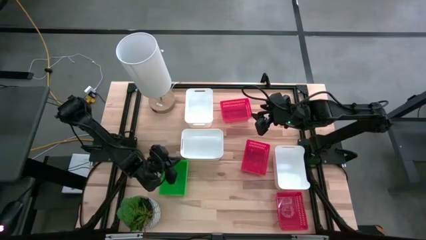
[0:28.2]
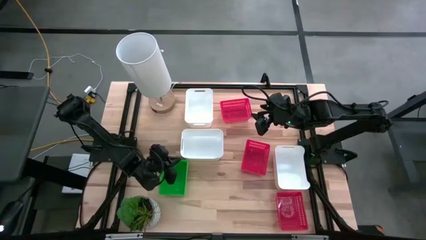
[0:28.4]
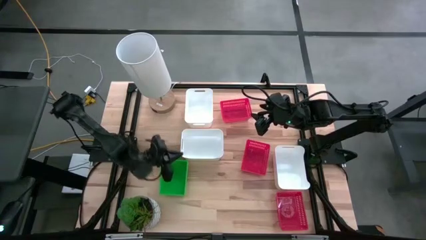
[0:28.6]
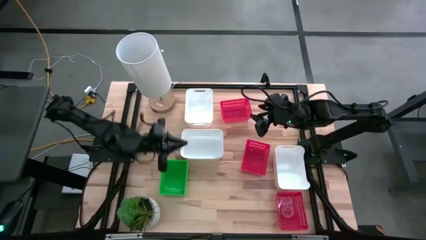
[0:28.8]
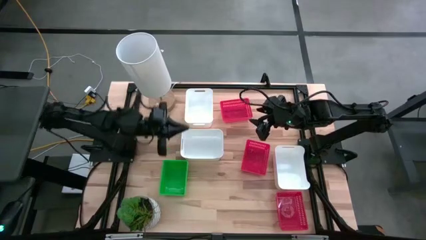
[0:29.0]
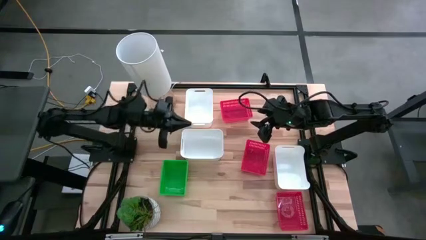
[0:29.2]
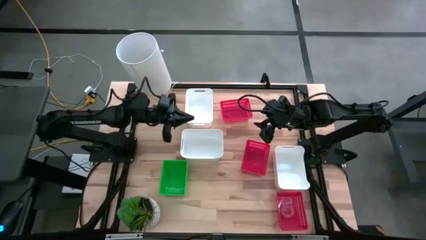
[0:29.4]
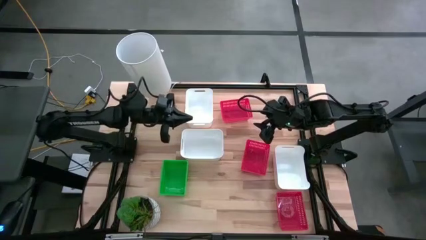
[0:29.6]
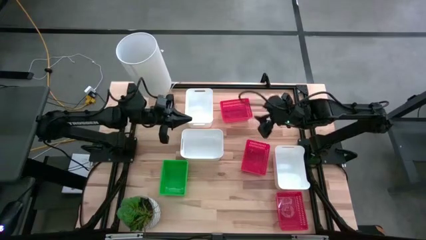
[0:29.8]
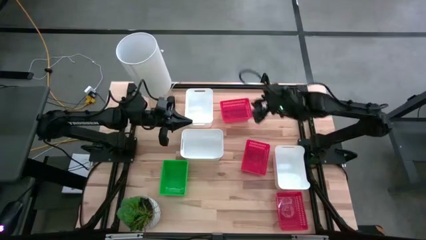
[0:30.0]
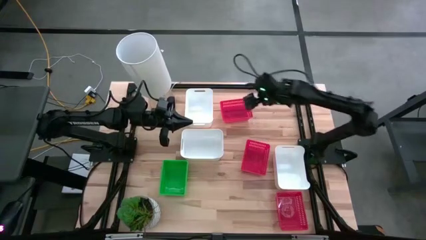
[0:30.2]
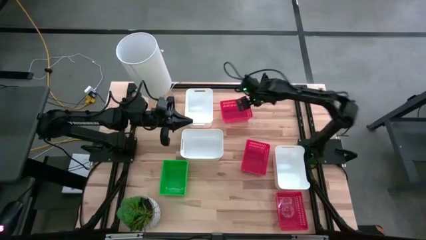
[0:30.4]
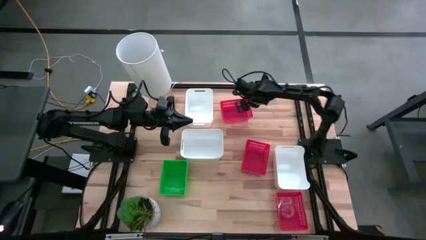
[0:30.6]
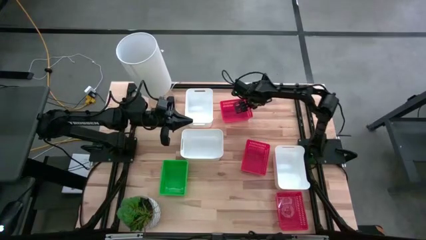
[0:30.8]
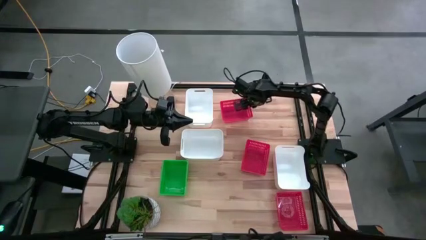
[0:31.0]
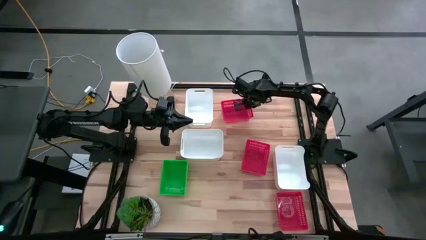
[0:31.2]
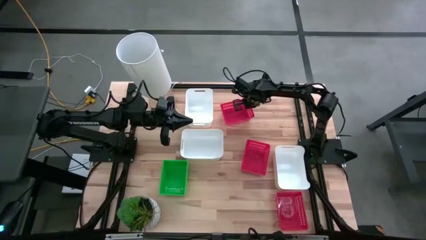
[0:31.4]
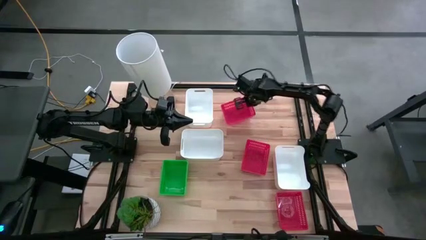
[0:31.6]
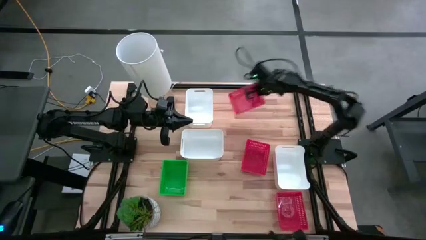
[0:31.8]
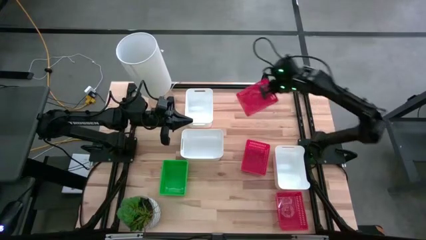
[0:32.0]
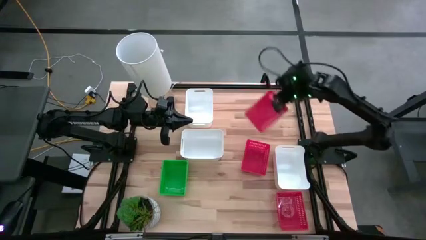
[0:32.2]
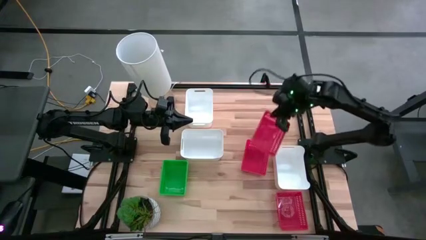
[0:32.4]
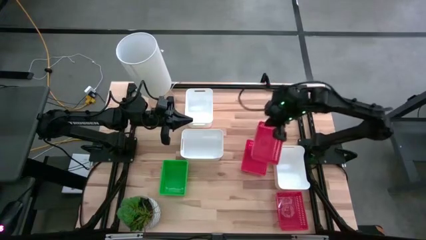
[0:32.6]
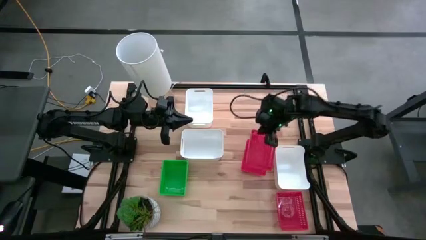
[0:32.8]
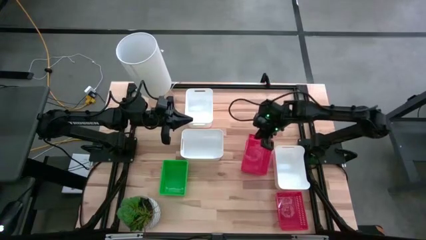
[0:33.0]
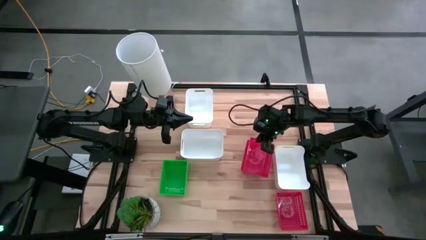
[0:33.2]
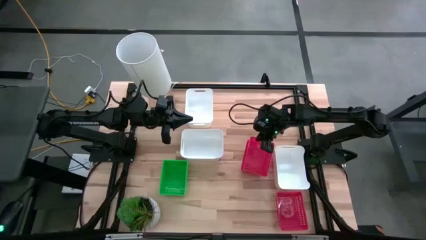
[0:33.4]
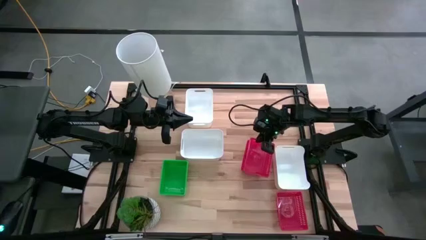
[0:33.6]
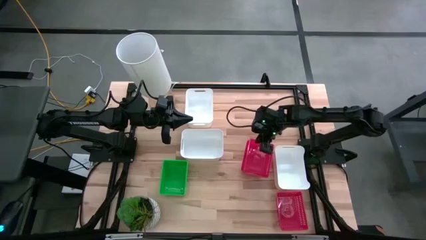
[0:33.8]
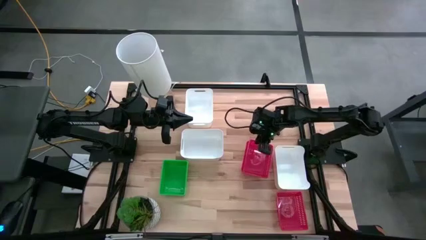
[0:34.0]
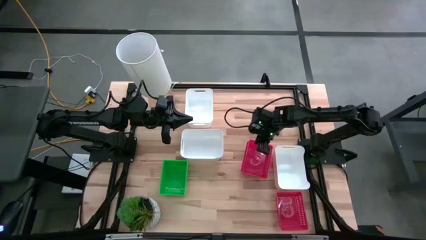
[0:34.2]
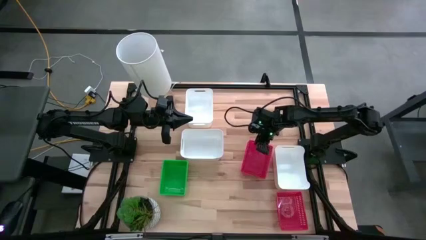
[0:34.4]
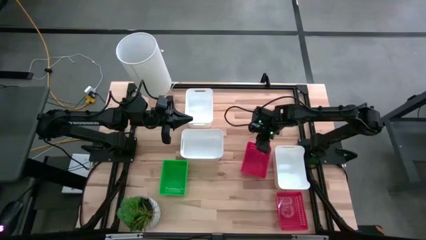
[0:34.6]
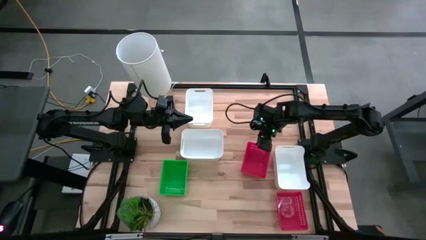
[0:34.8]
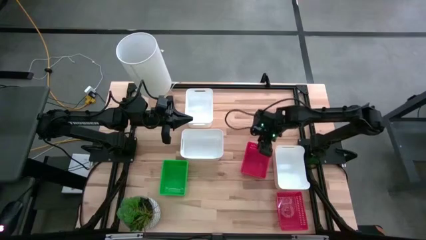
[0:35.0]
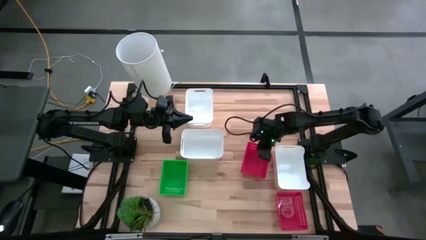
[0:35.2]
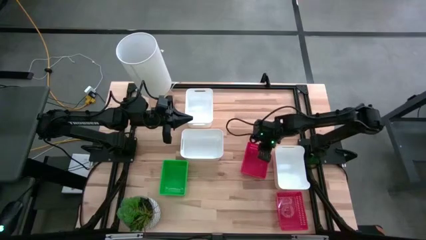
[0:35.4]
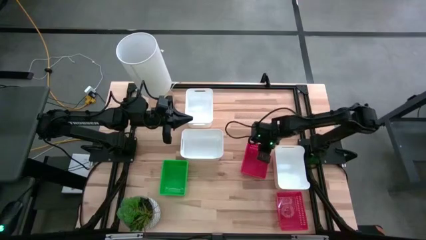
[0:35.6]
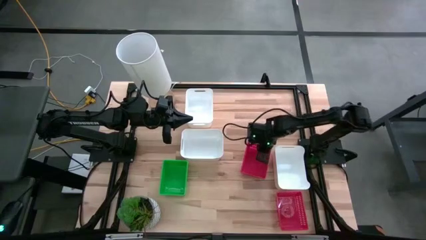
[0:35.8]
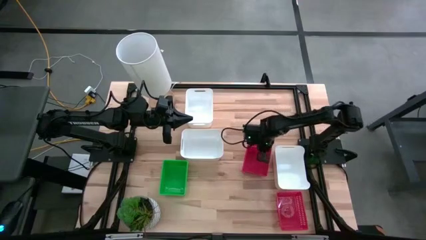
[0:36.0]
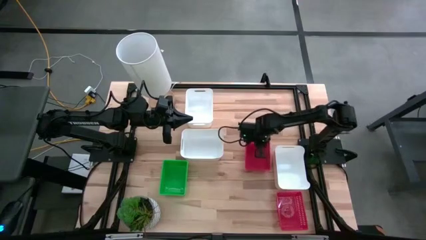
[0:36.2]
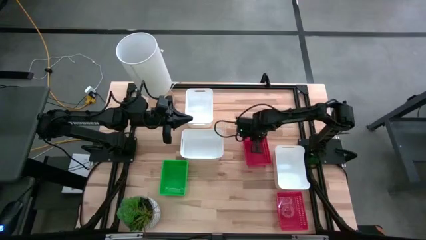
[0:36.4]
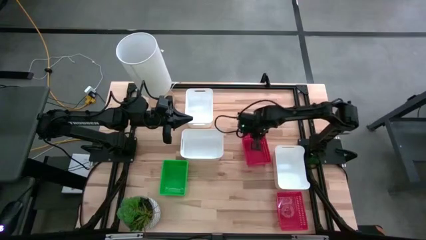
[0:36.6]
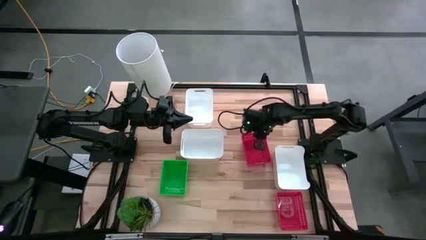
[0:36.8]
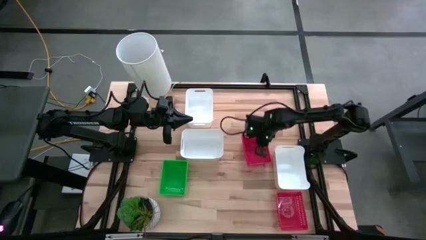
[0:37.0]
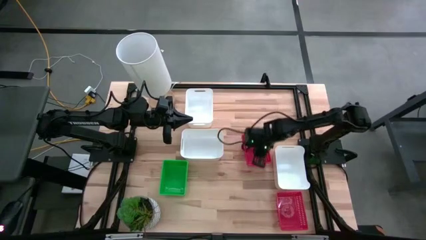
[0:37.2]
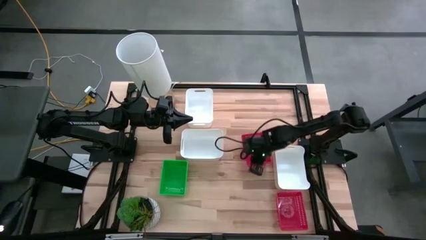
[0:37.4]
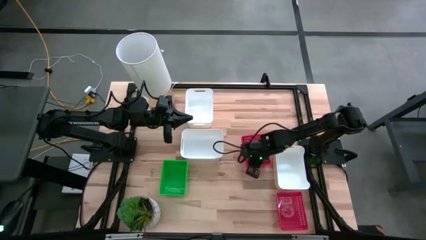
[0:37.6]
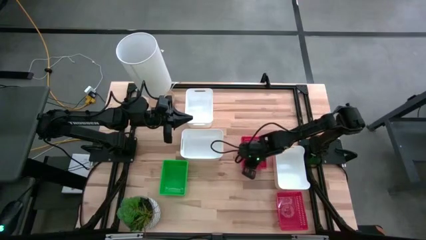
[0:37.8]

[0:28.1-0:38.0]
Stack the top red bin on the middle red bin

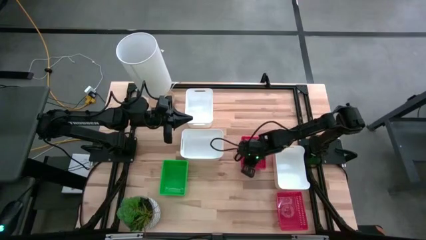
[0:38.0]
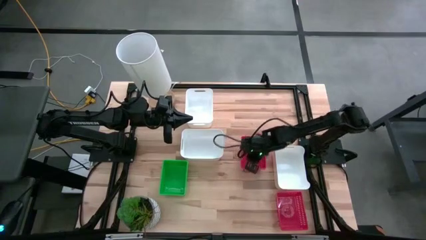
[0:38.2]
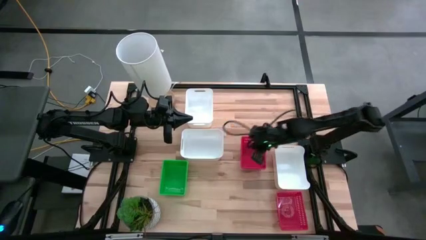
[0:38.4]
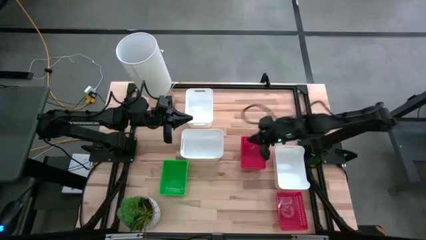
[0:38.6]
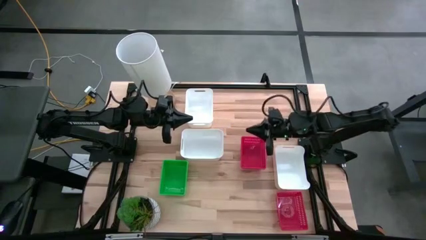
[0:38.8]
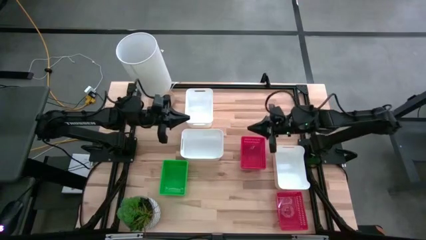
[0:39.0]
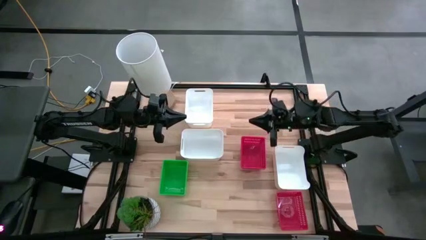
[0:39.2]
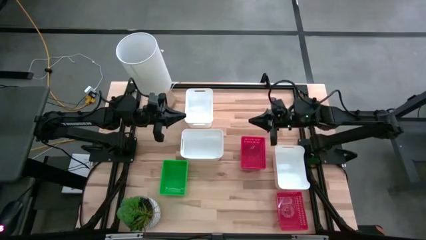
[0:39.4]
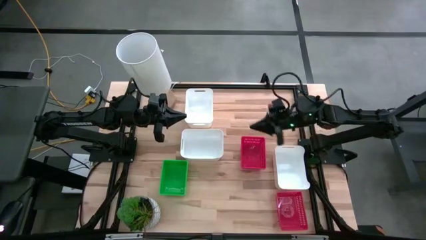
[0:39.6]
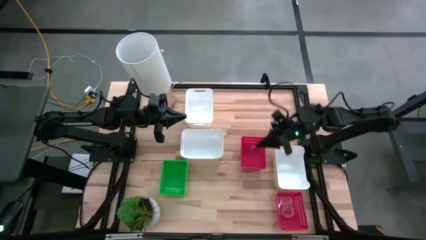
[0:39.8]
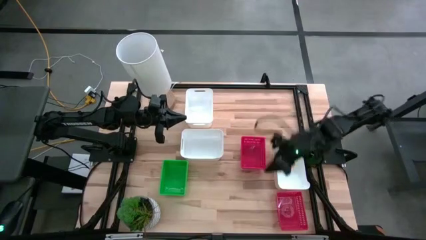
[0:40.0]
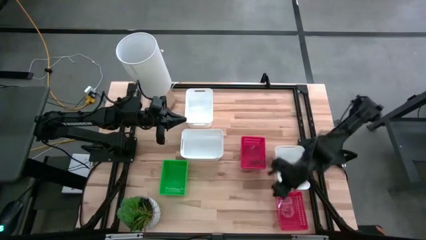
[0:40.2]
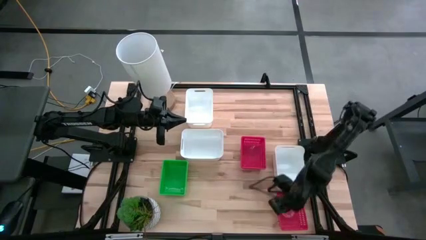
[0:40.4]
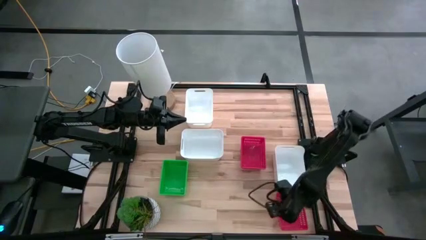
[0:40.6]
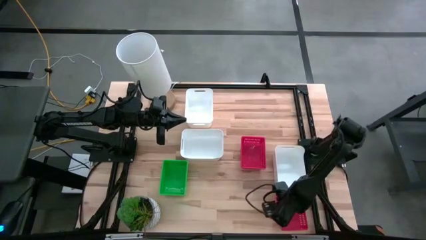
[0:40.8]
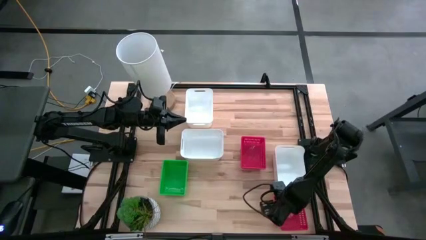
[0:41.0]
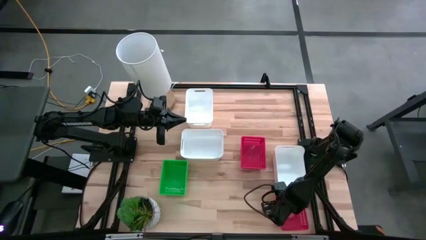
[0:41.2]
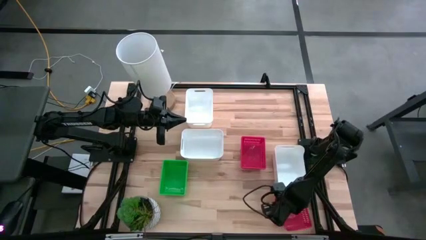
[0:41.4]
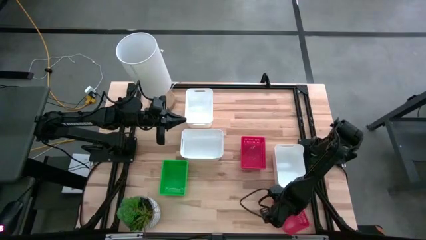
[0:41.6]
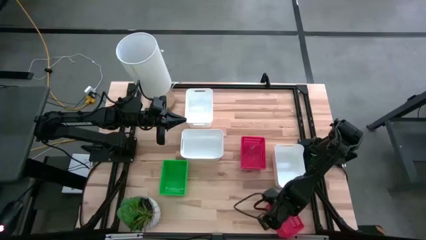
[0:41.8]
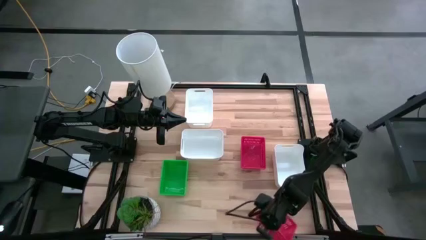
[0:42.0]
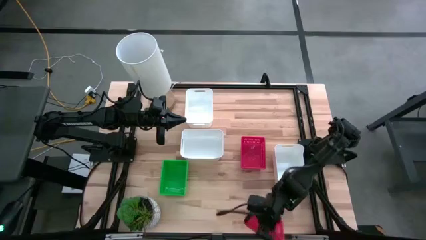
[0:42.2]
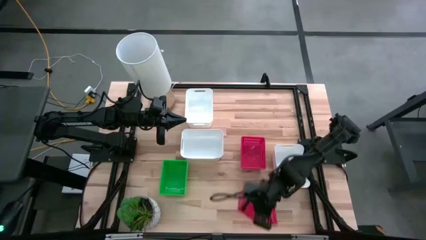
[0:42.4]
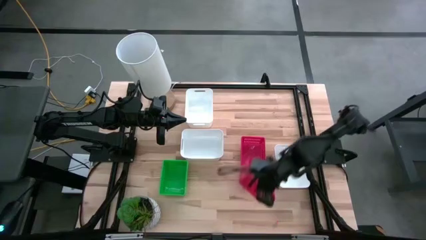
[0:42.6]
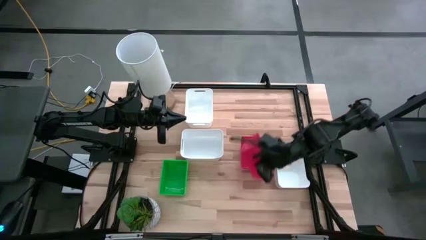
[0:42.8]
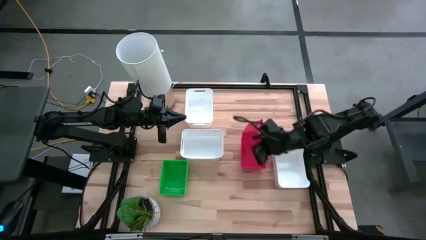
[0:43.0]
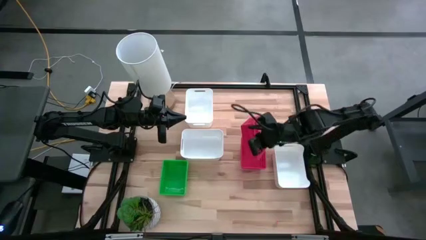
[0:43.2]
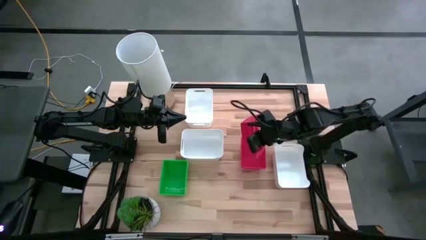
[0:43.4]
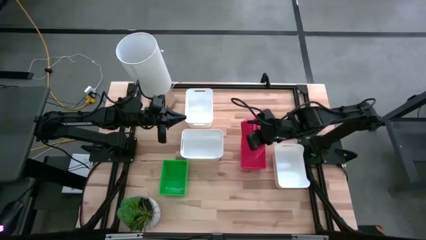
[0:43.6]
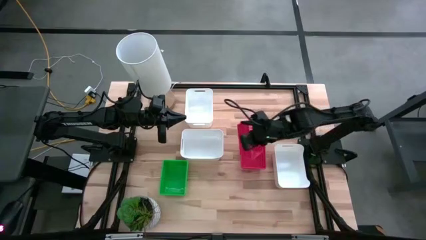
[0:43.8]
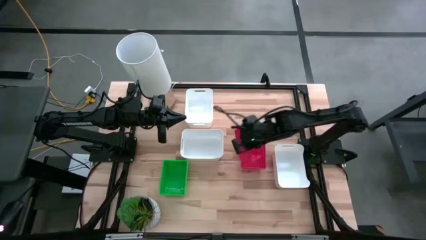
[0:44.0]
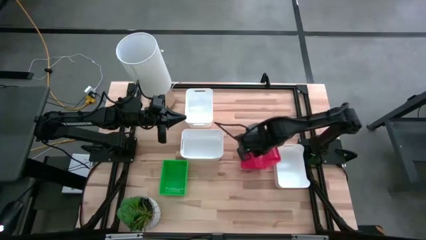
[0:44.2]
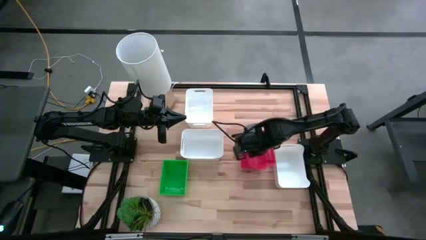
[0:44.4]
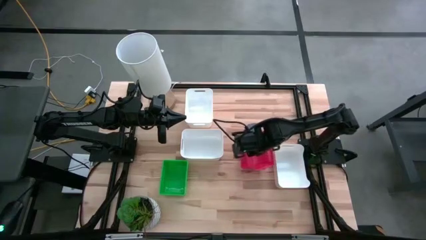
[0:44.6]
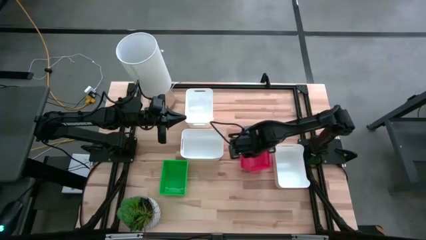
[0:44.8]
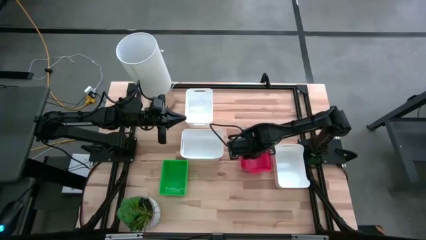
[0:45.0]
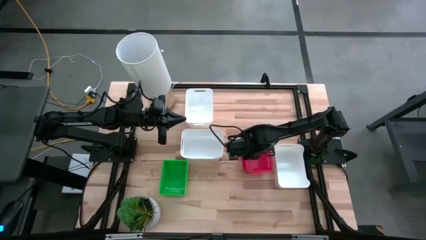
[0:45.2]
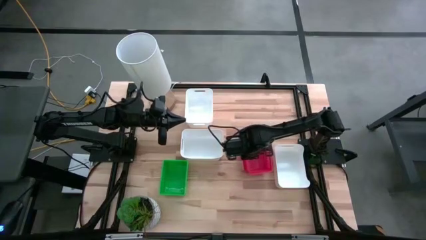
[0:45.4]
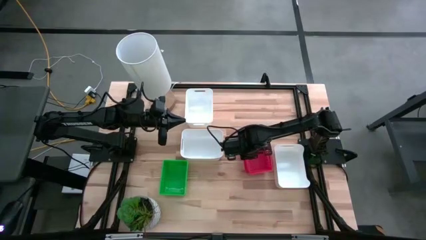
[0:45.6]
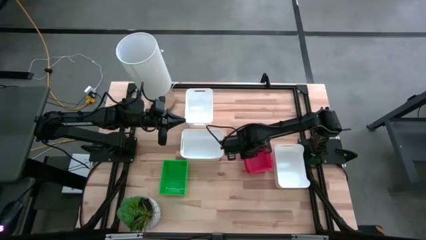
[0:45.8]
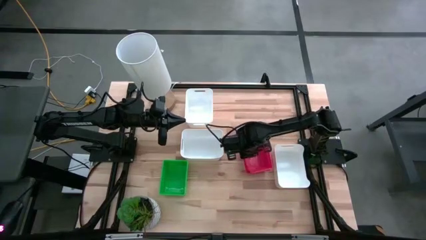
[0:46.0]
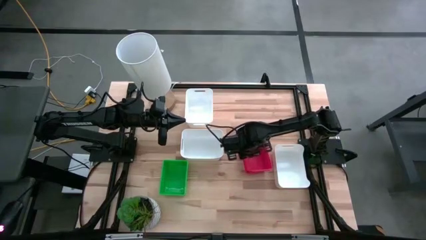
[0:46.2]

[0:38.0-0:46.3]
Stack the bottom red bin on the top red bins
